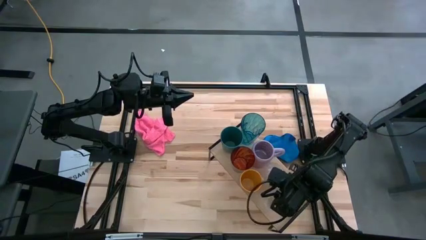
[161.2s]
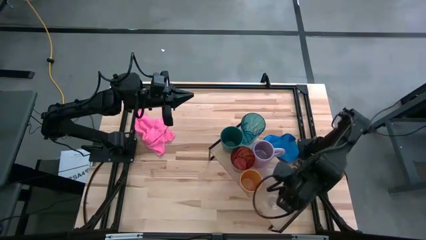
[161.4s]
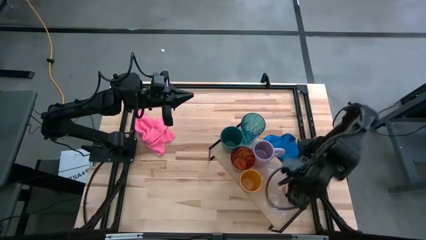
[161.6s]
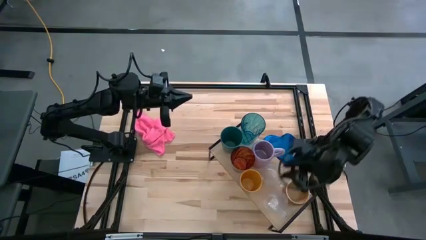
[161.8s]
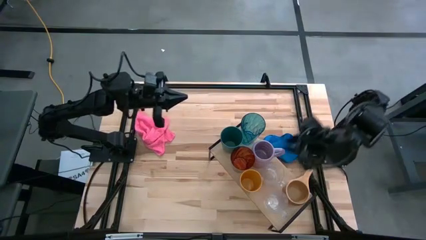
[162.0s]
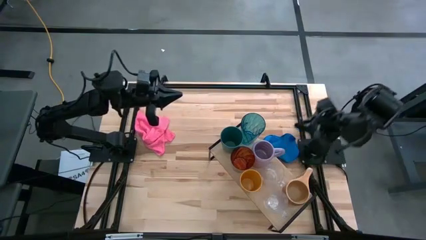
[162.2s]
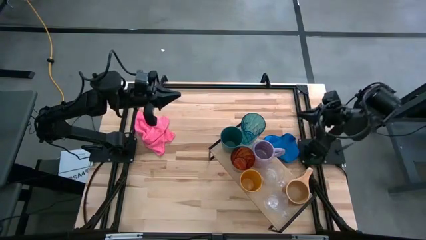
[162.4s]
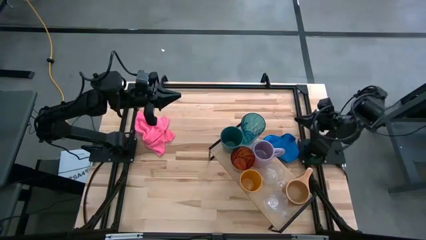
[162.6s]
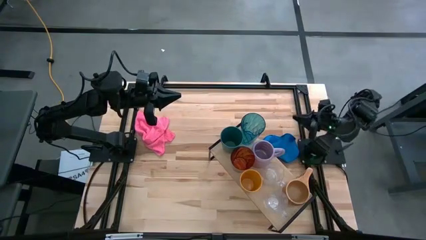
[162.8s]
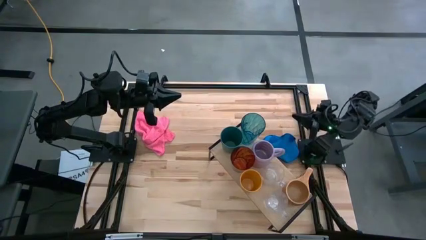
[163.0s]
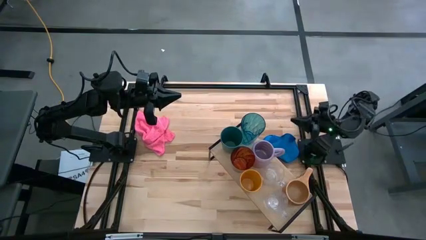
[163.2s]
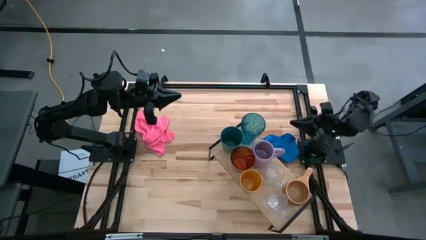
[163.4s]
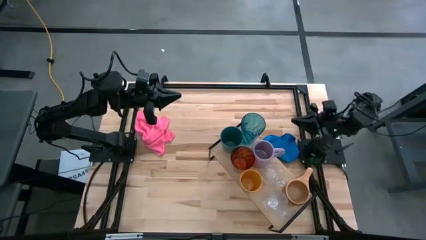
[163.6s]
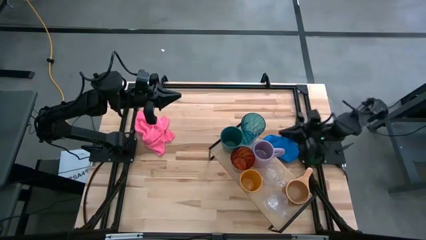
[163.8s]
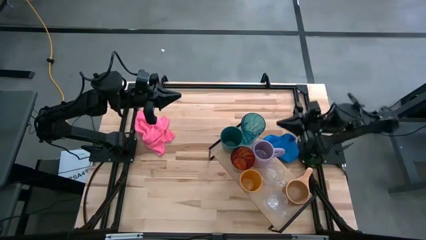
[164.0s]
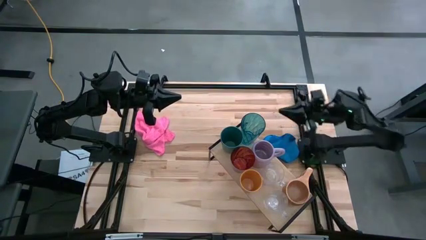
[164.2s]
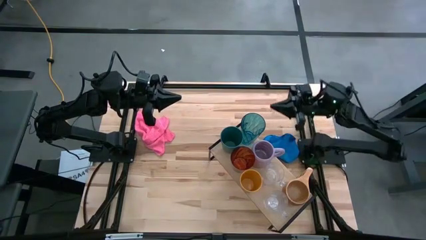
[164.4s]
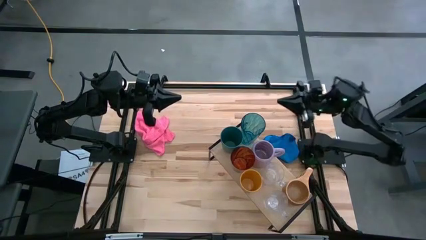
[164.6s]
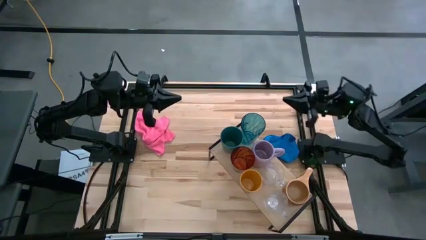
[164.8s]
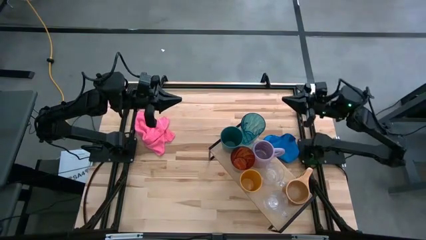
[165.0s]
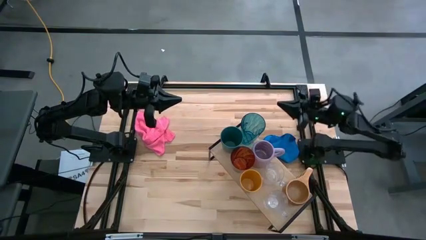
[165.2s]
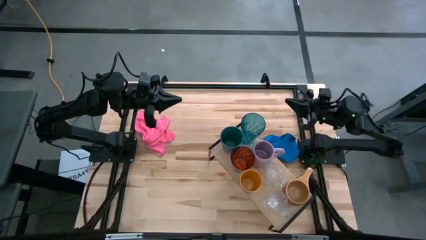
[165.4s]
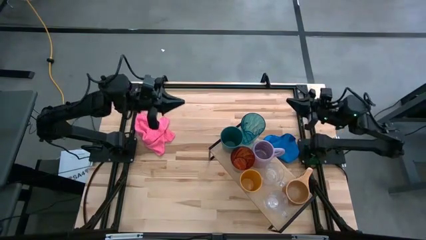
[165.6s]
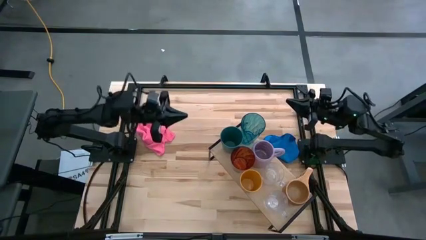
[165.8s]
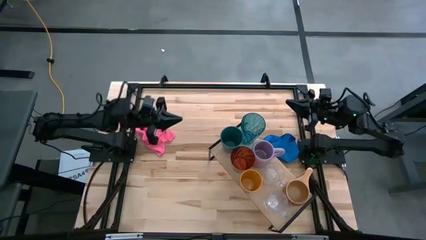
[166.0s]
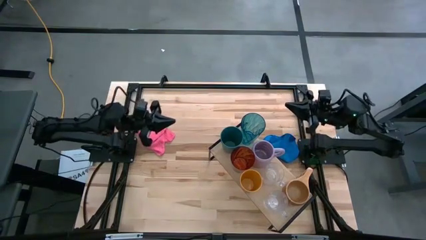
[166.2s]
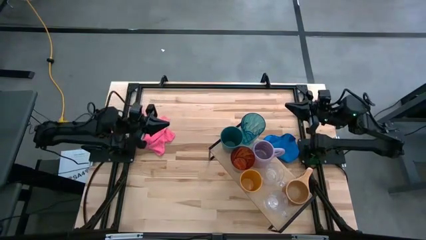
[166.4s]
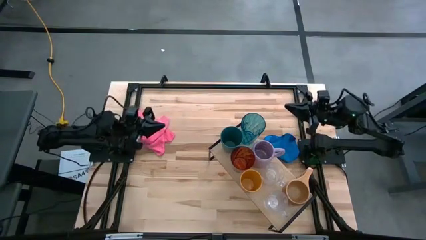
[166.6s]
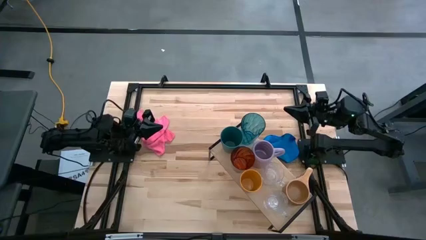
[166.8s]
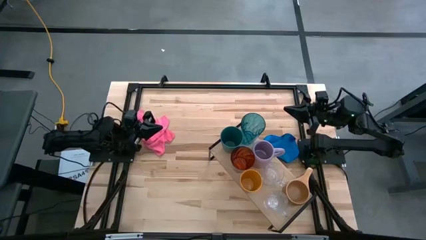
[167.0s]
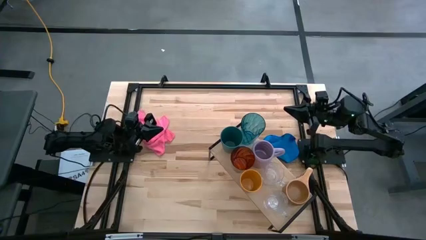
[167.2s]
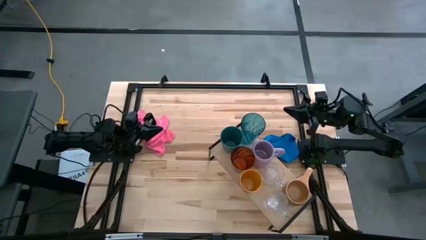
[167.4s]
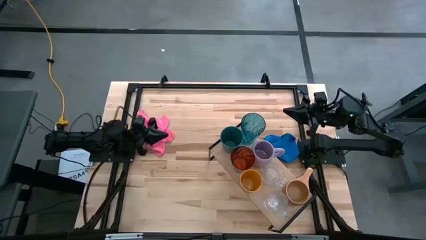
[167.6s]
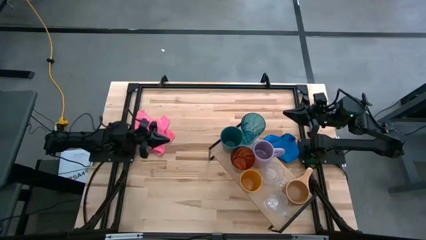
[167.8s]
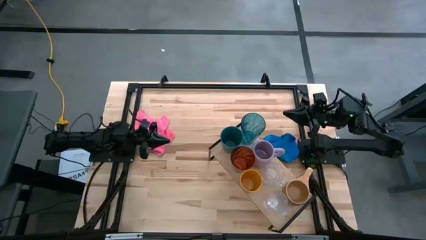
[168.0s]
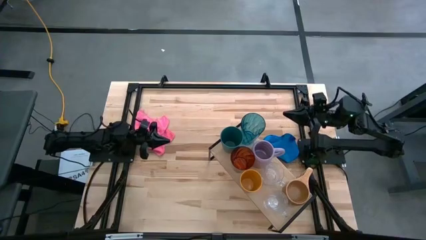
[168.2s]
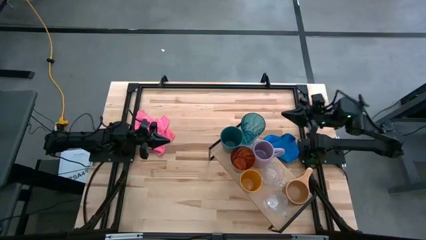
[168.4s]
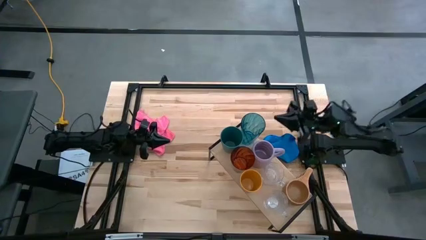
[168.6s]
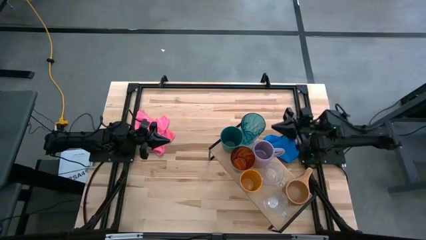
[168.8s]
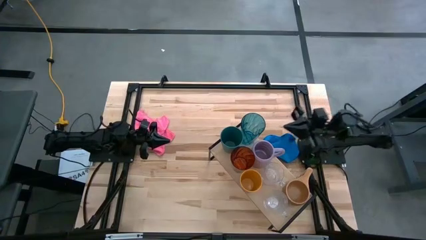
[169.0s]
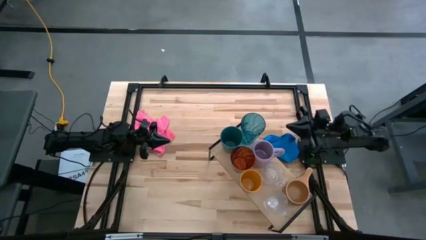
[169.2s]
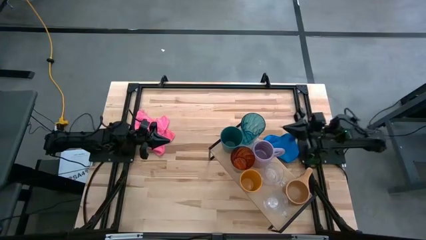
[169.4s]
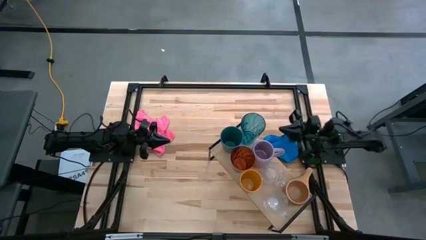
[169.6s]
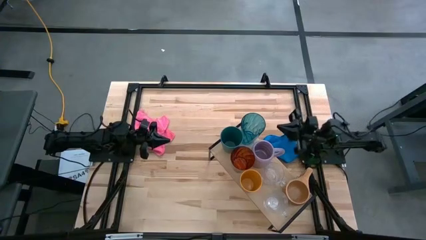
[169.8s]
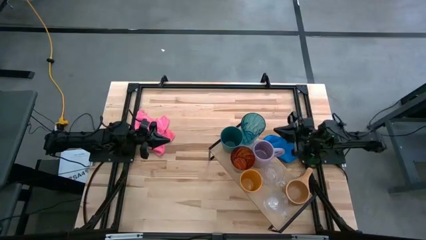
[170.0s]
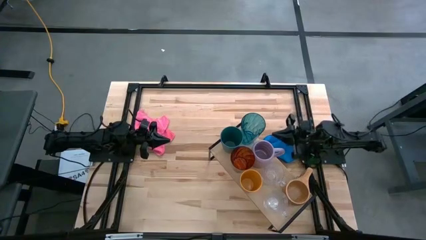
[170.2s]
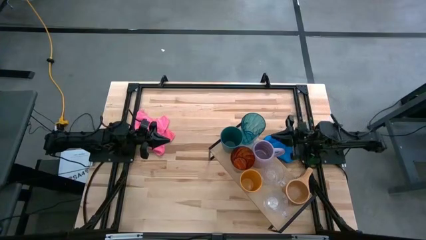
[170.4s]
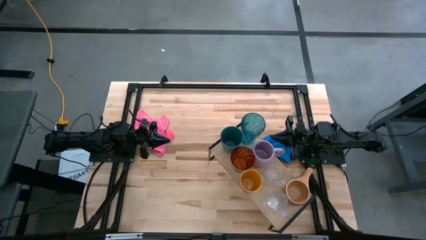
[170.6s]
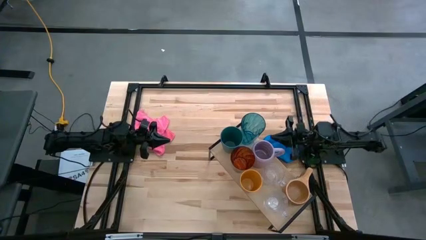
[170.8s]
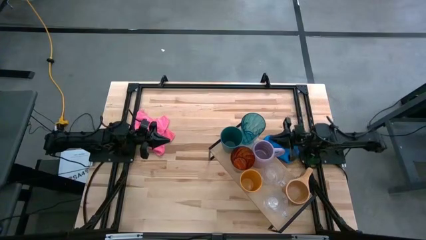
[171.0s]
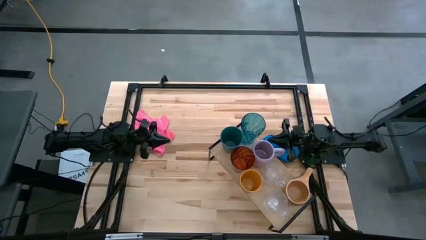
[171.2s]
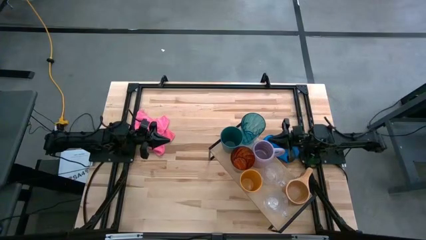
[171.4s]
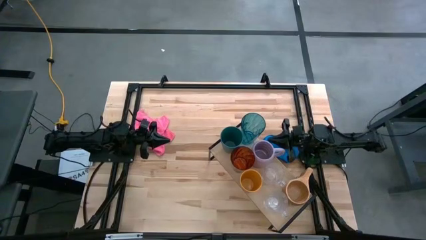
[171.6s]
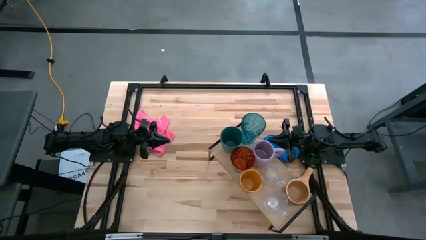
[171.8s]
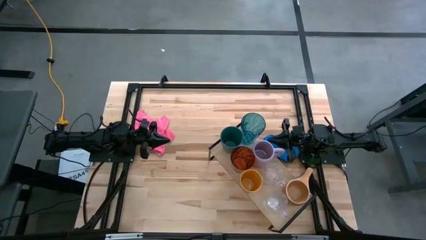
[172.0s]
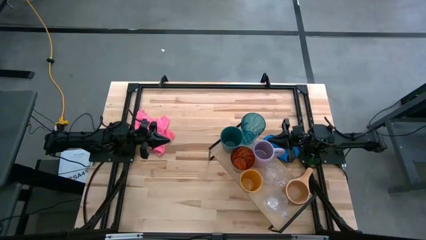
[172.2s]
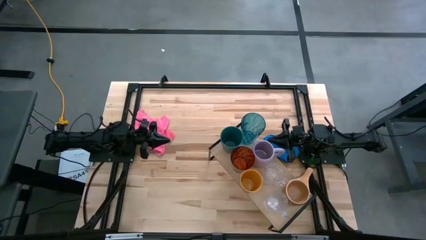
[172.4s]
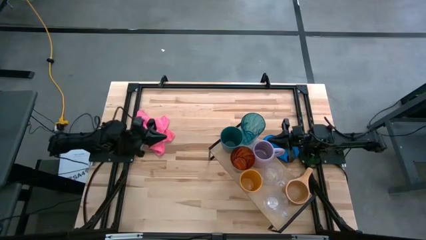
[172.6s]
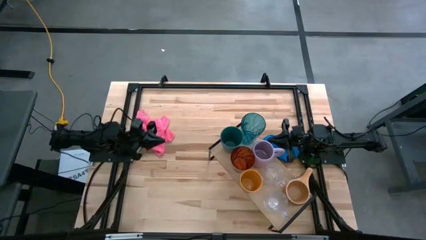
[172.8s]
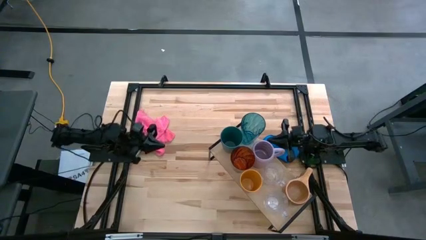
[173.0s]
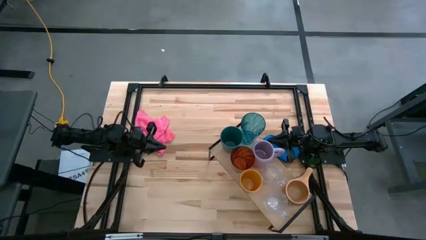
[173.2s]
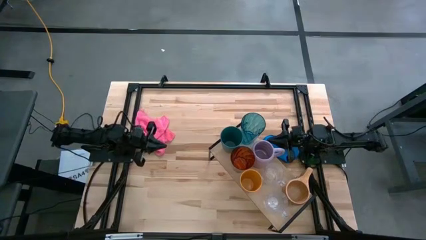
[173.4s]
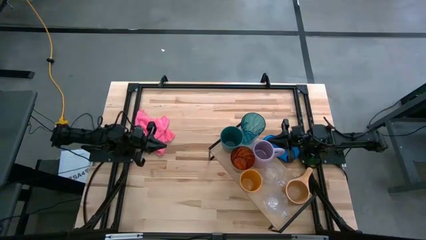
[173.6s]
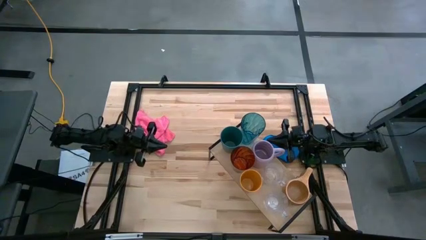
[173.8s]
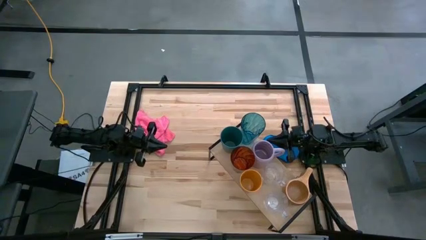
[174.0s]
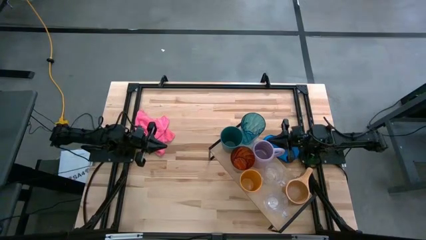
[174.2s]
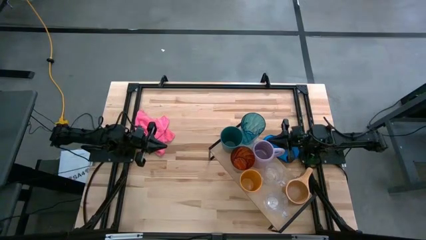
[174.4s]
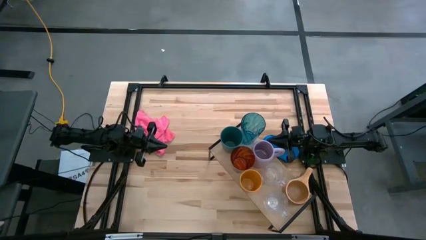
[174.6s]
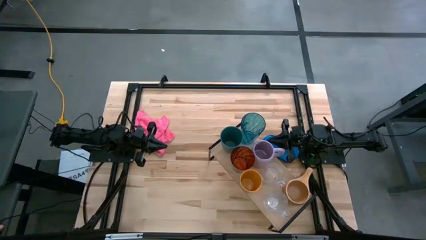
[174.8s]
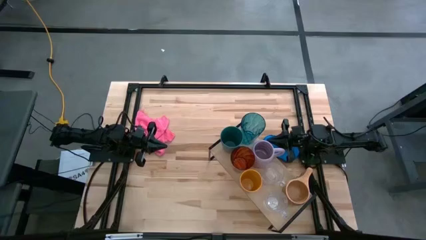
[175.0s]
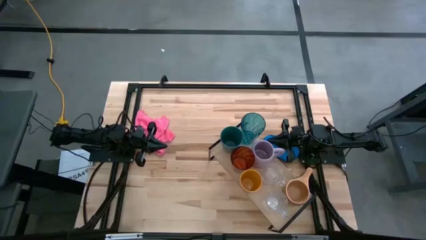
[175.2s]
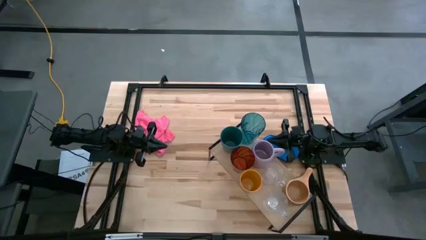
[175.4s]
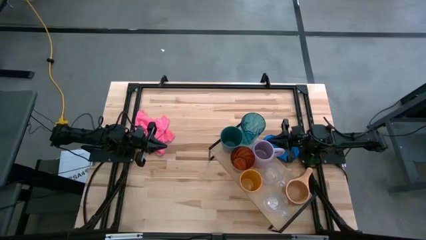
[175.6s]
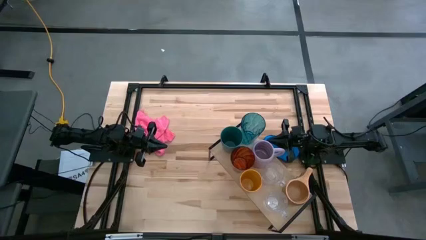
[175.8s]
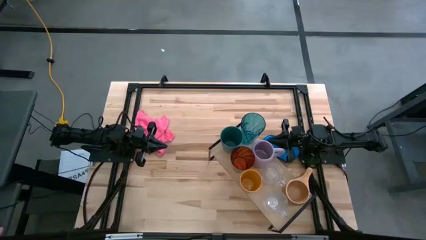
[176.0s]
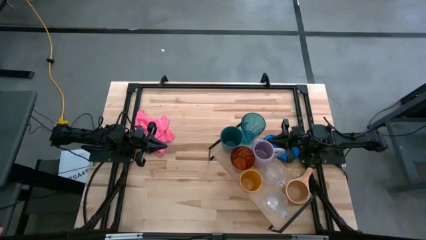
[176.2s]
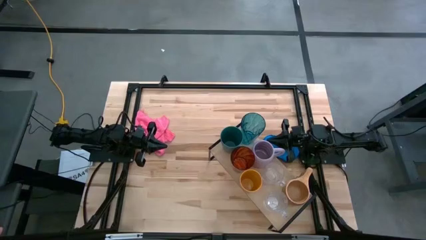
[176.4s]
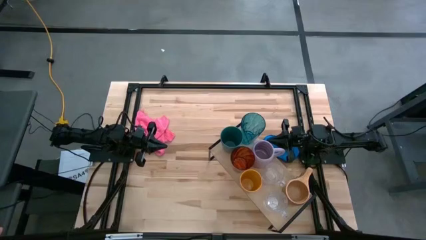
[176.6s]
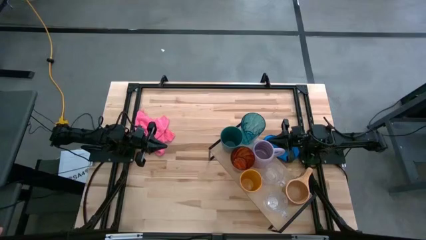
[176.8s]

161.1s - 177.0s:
Task: Stack small to large cups/mugs on shelf
Return to Home Position
